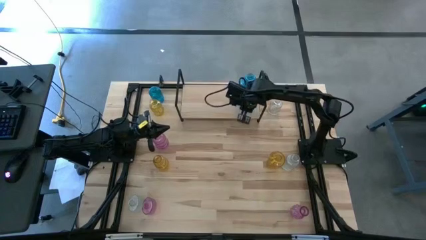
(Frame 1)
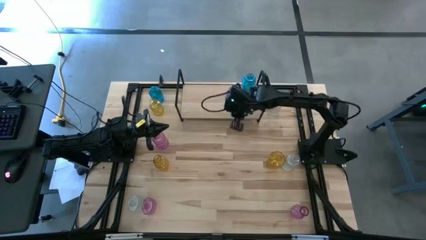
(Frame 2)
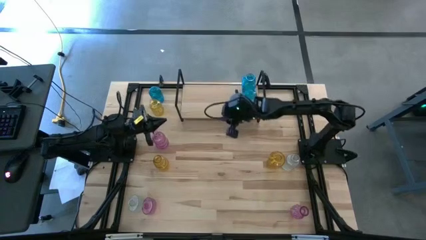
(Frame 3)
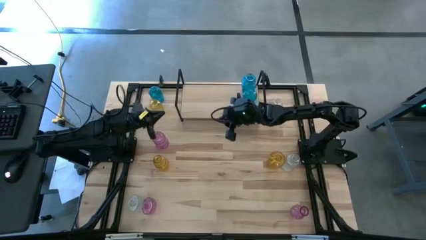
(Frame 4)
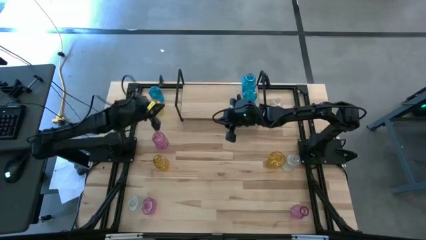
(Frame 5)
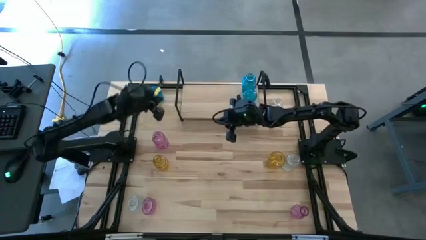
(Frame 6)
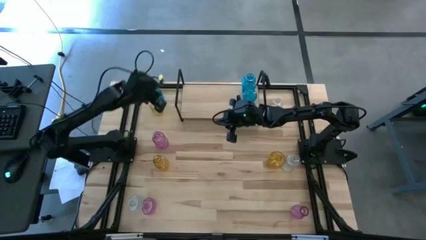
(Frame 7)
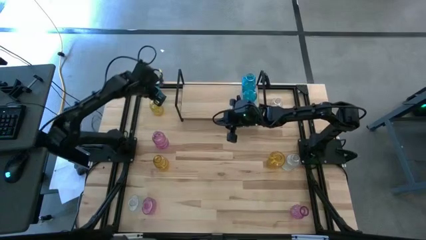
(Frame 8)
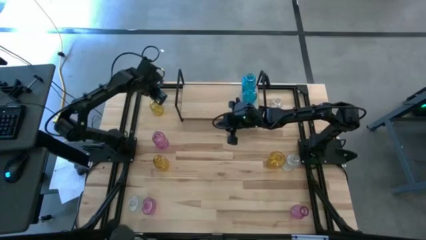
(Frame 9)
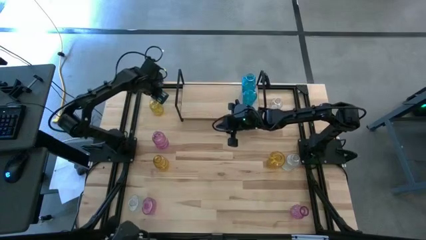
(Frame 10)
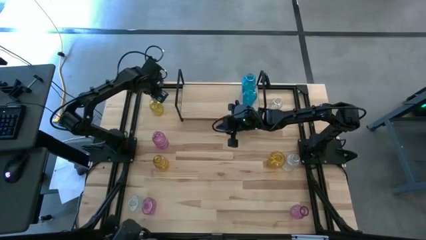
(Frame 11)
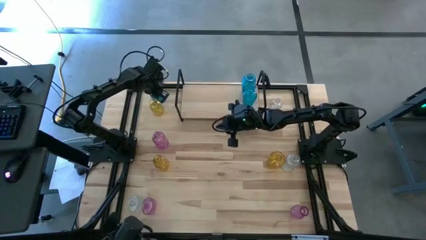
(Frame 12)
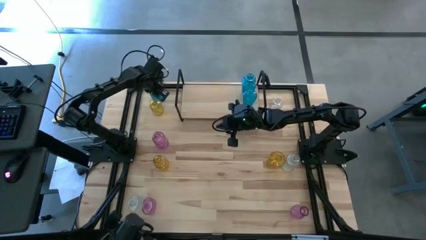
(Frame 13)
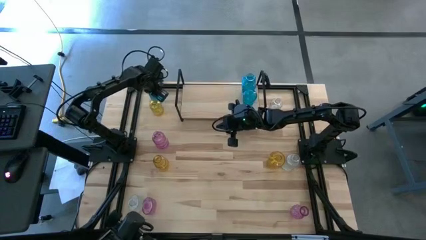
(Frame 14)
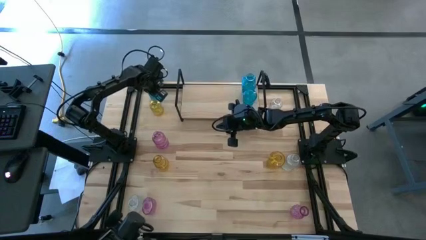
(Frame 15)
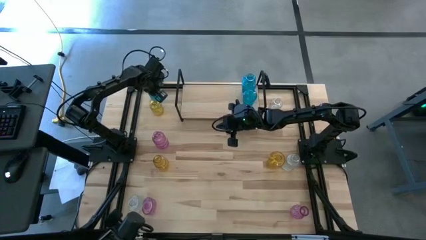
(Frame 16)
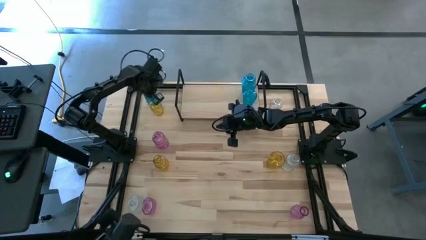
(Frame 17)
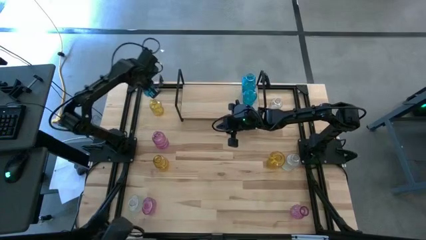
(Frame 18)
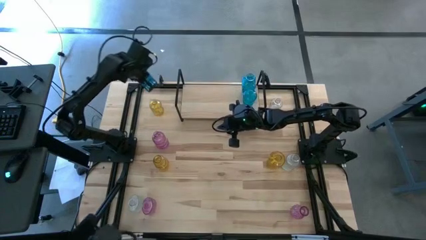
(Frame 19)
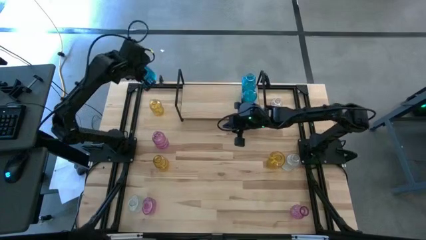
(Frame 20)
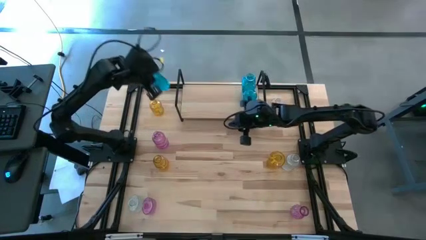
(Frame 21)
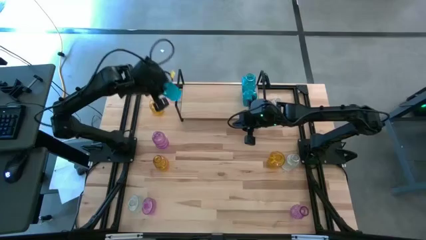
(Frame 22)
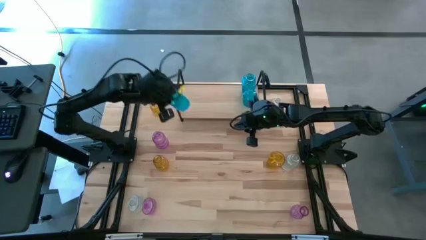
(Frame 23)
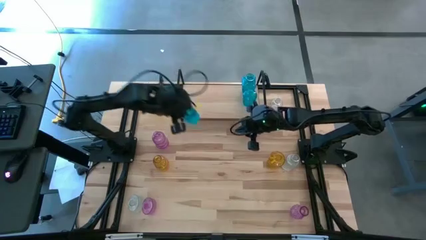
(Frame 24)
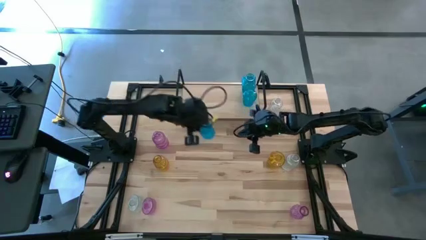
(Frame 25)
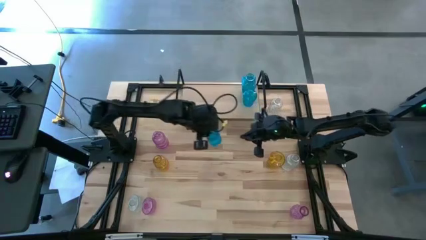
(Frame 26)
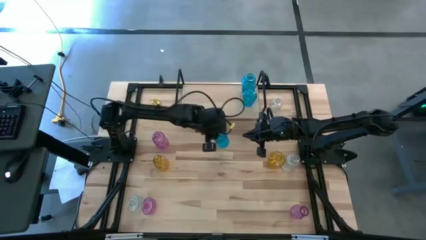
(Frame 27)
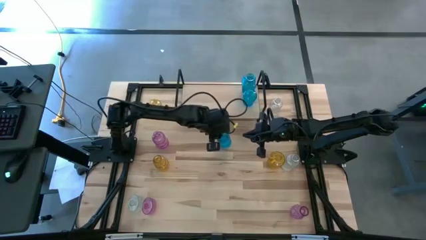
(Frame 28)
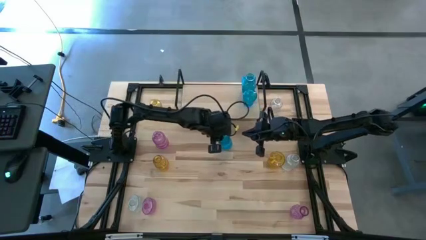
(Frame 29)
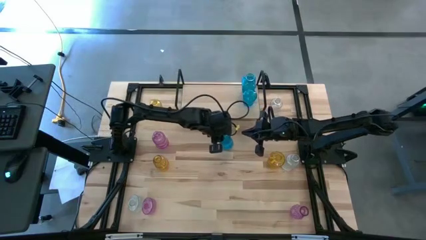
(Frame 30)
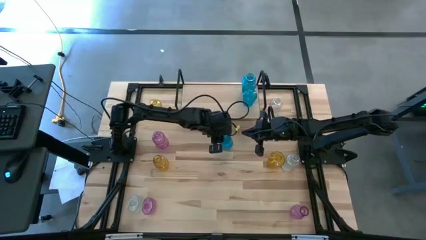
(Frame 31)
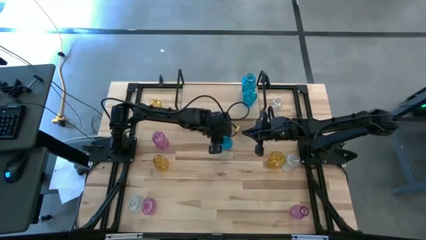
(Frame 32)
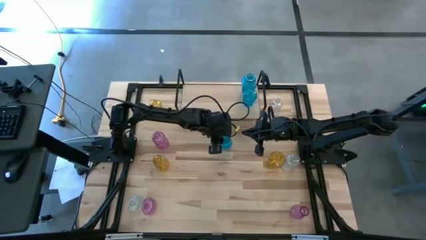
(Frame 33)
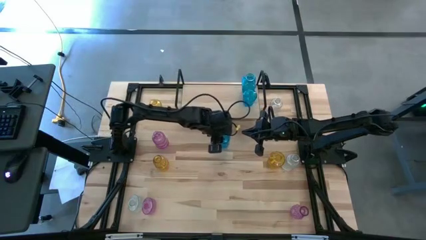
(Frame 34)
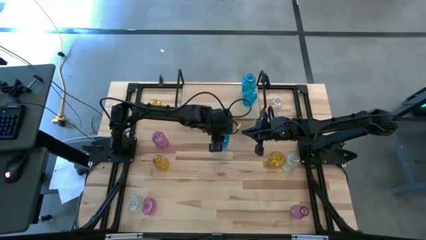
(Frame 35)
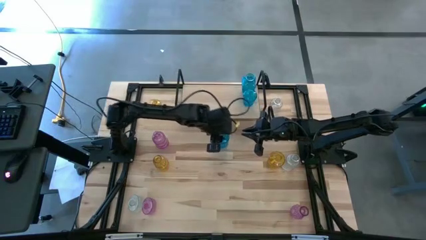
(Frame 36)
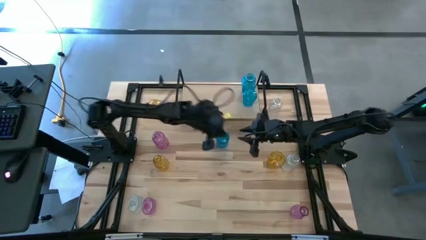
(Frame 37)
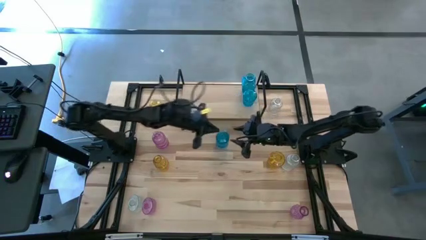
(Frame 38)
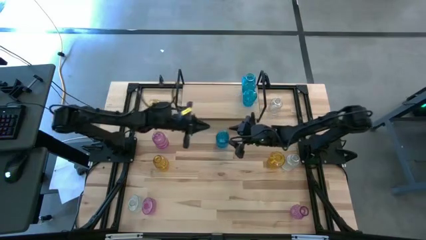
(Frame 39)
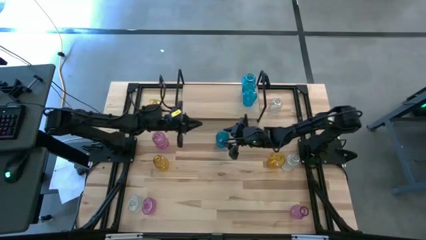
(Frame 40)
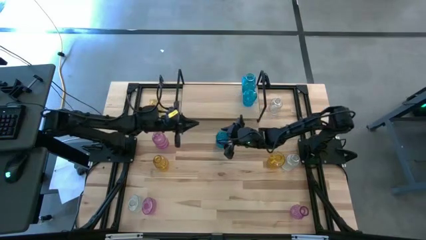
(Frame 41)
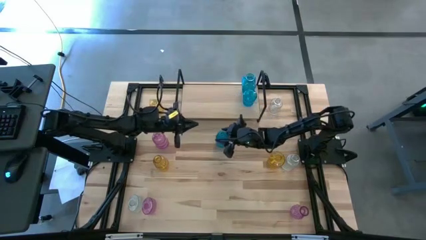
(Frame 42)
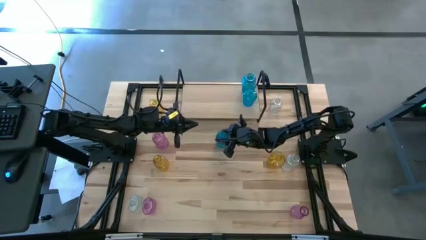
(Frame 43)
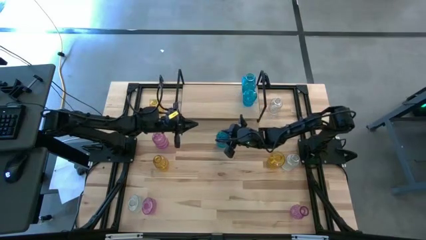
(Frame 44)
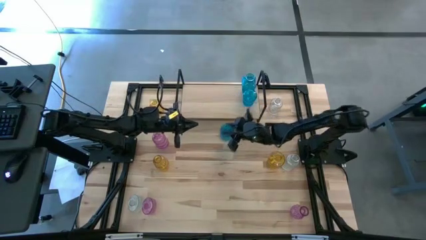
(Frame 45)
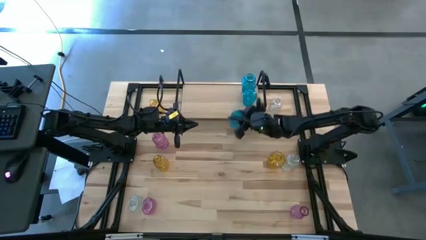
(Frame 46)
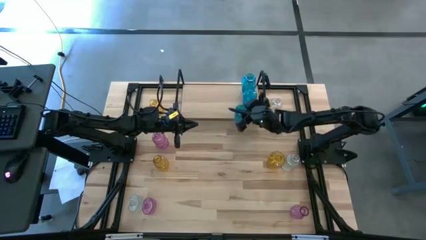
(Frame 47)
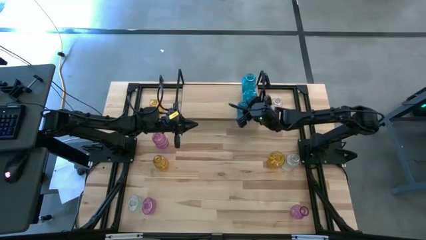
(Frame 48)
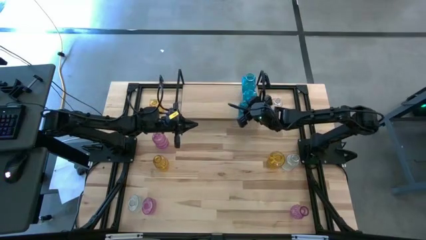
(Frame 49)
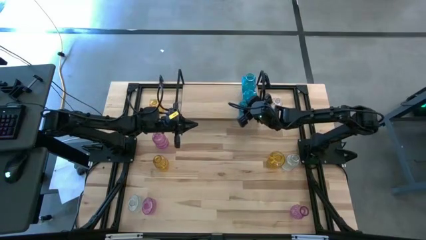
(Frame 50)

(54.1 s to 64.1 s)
Task: sort vases onto shelf
Put the blue vase on the shelf aligned with the other blue vases

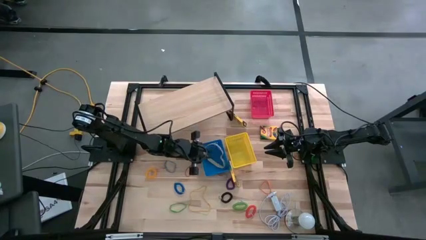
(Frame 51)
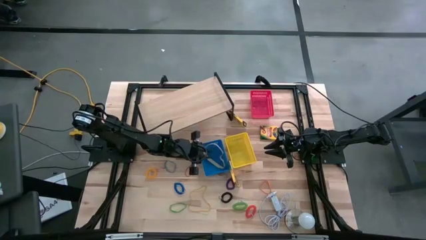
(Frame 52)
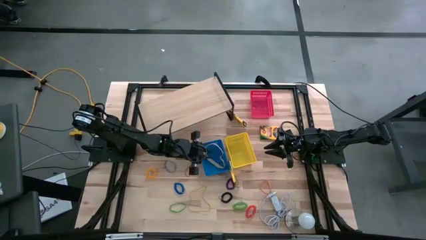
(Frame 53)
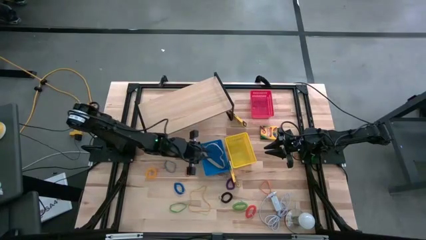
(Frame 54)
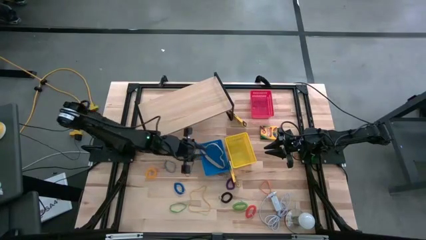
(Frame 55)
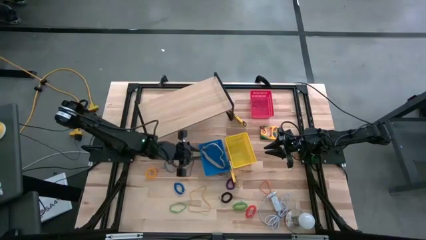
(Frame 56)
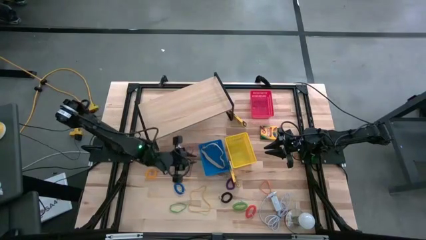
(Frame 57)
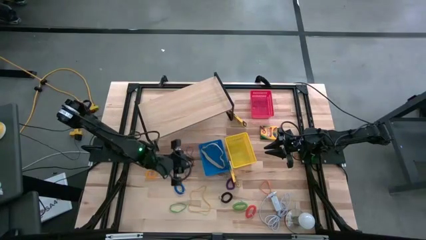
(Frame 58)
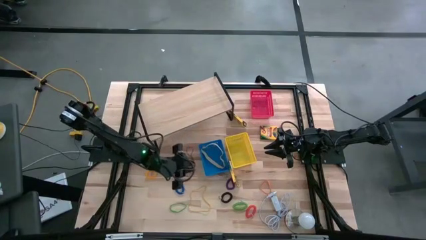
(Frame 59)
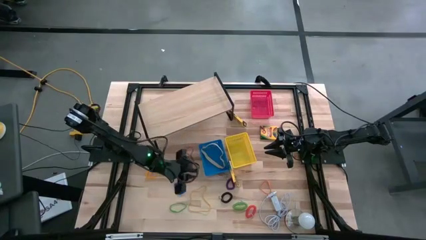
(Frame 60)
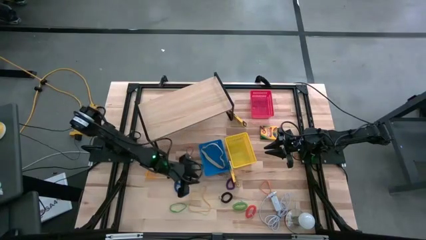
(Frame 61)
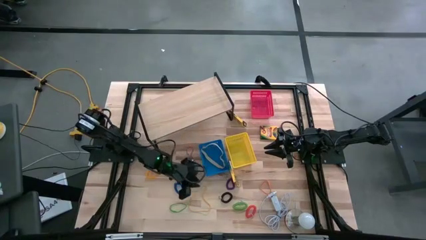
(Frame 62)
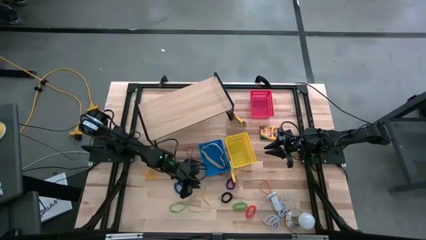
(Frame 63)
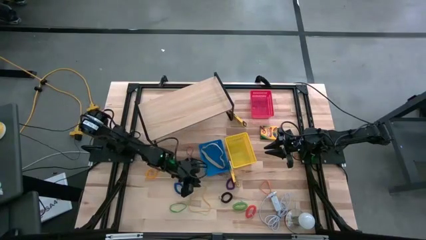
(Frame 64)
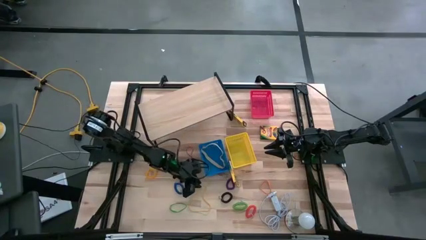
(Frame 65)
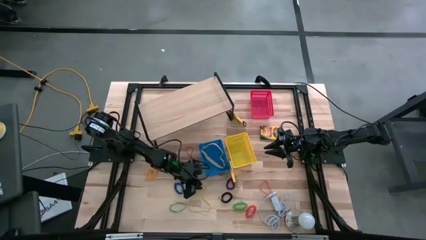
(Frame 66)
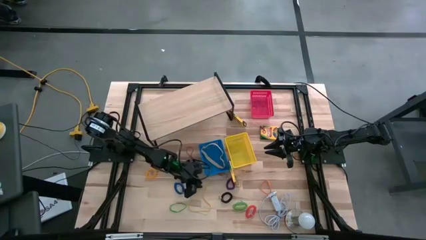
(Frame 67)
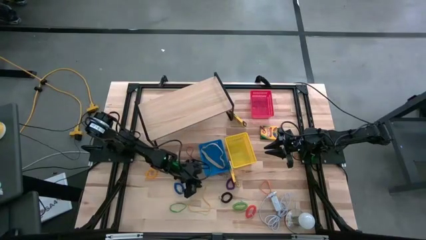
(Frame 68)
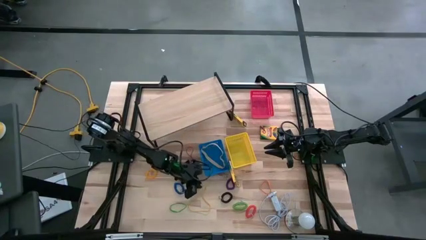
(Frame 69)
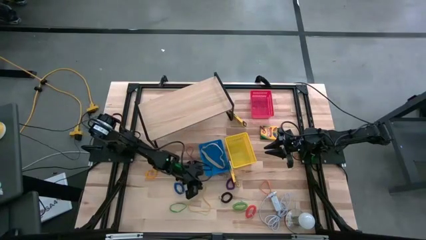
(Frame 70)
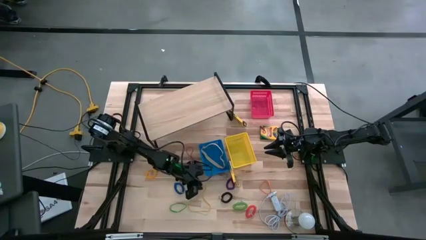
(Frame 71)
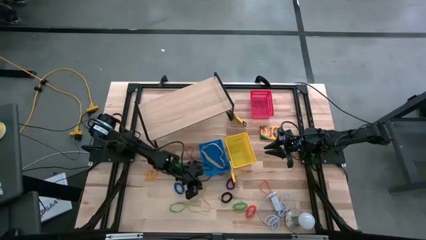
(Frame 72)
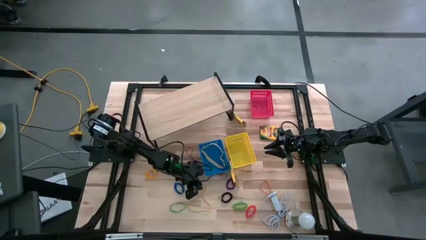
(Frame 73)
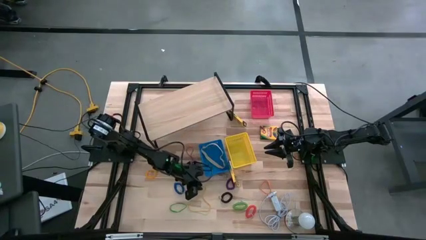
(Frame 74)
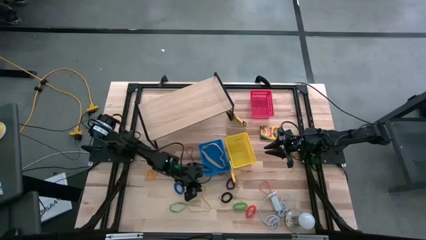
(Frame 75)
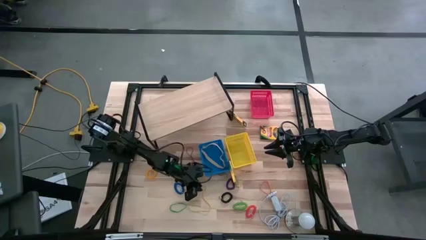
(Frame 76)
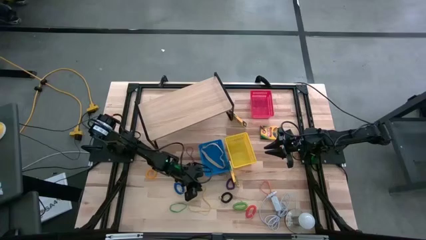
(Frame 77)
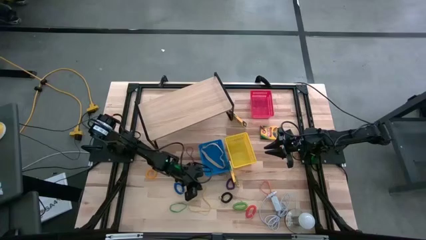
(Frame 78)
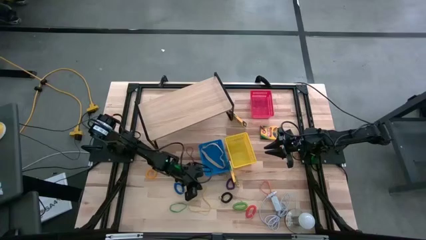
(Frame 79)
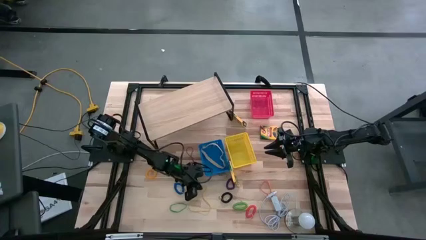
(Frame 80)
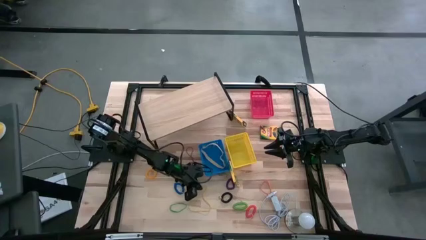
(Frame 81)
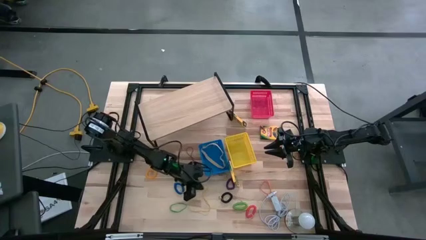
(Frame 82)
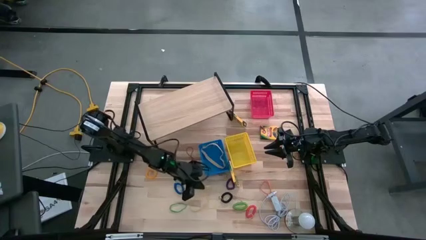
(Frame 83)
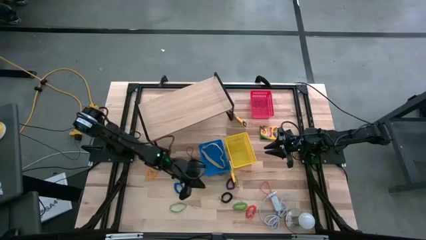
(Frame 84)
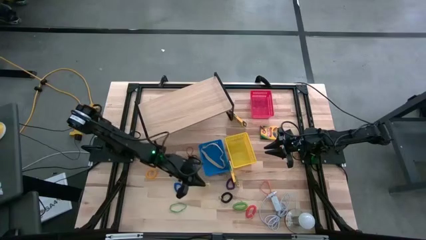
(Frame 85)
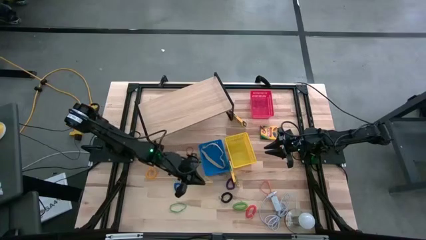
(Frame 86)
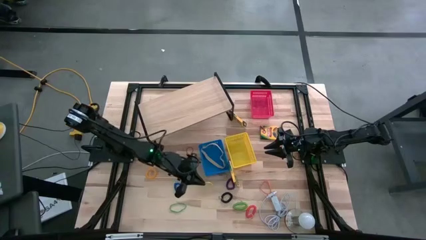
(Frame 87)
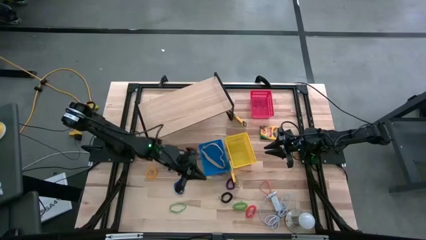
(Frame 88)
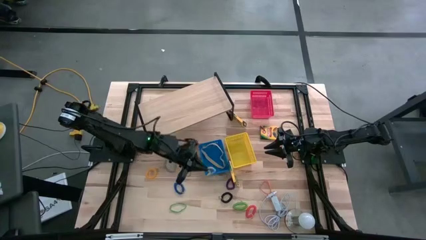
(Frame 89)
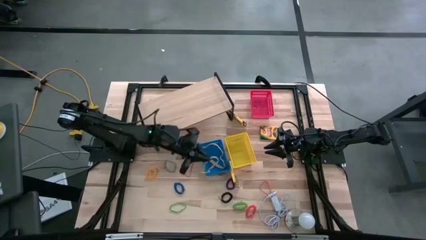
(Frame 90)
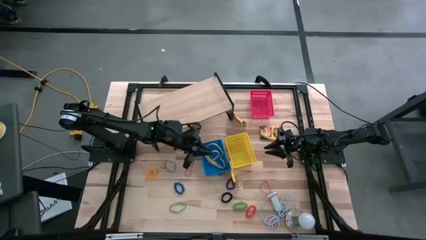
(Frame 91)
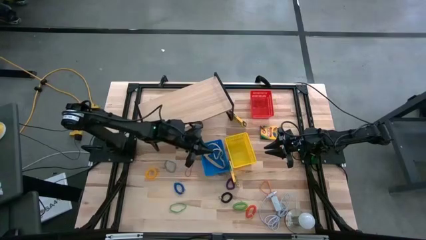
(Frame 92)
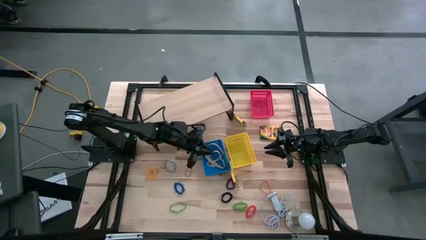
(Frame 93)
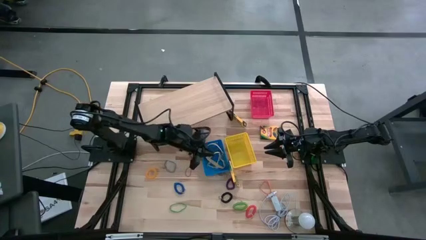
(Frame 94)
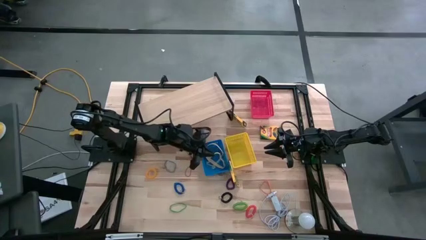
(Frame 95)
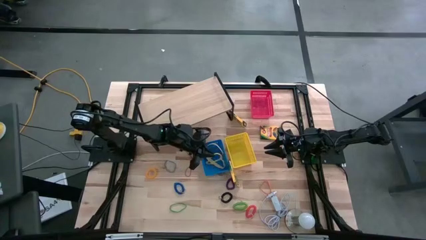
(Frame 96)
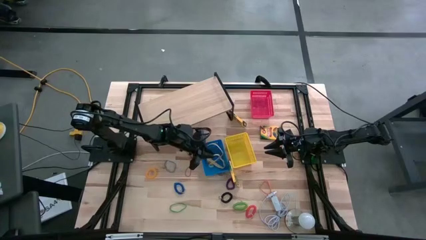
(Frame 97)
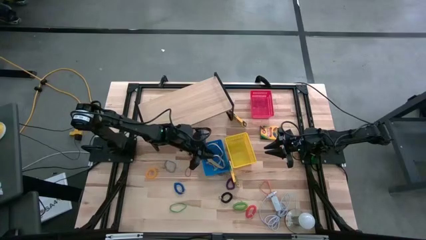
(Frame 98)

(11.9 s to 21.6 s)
Task: Pick & Place Office Desk Supplies
Put the yellow rubber band into the blue bin
